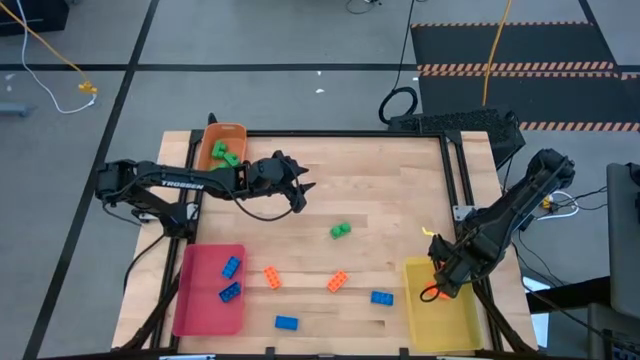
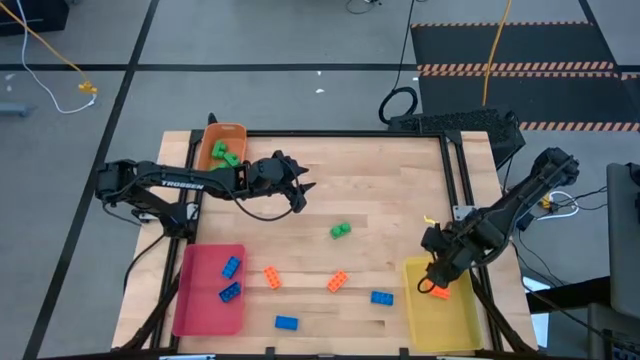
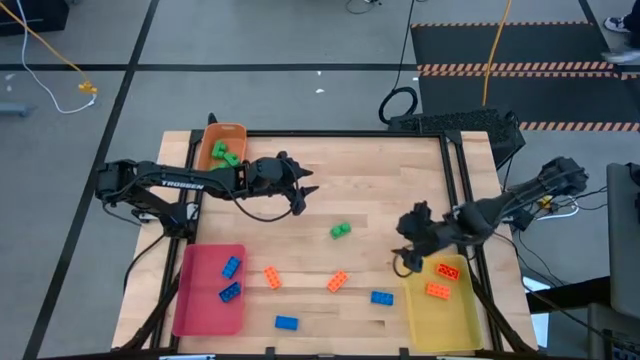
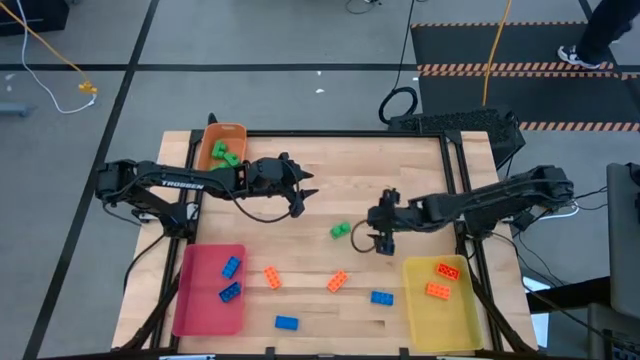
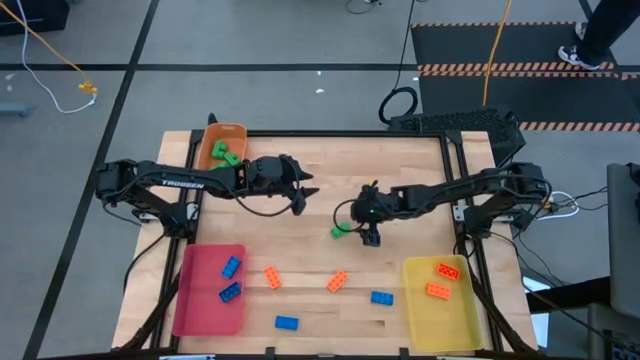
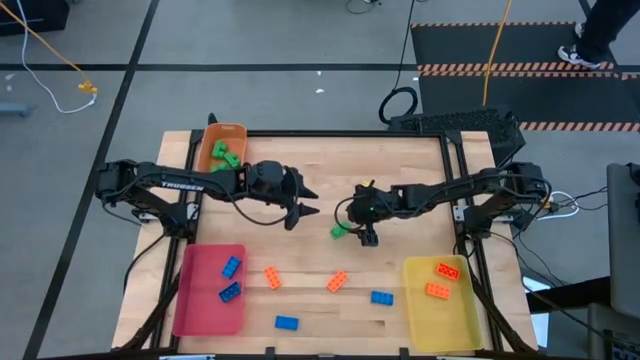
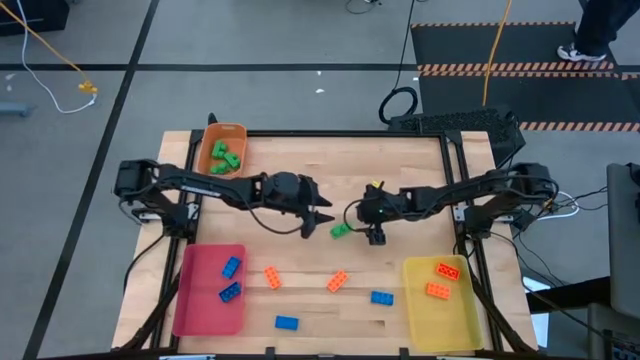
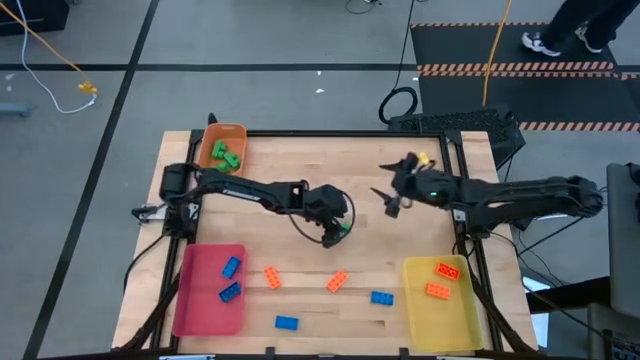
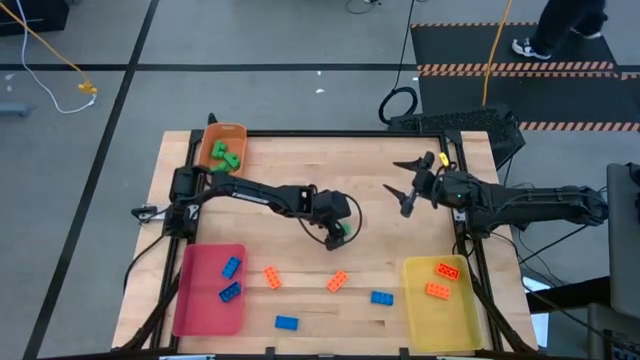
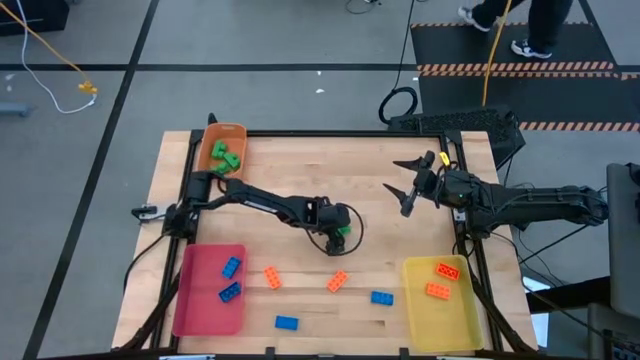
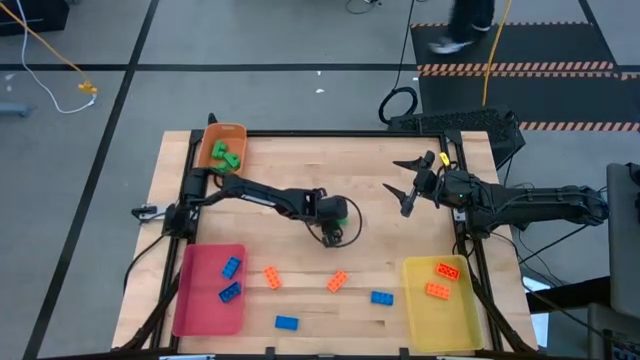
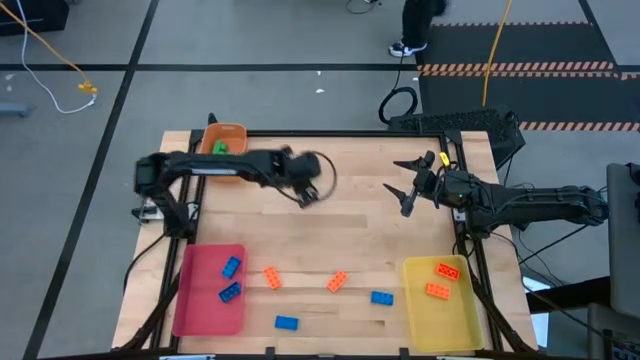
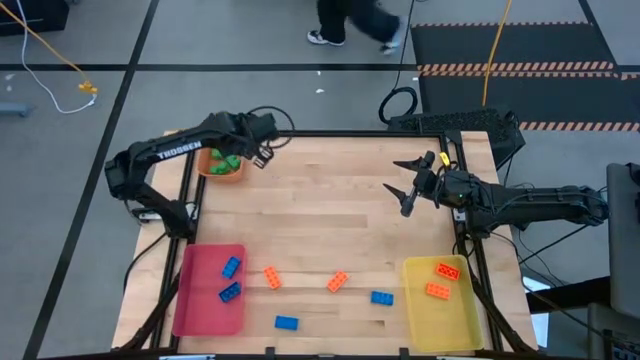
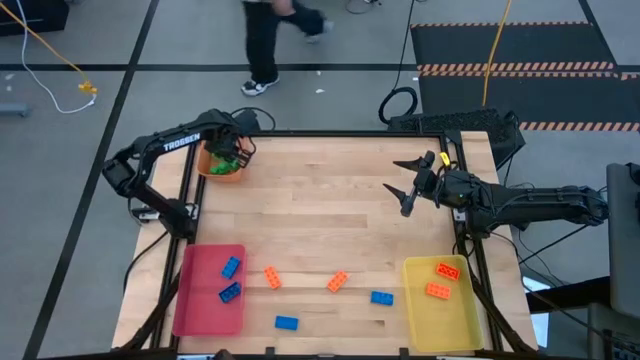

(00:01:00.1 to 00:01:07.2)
Task: Sort & place blocks by color
Put the green game piece into the orange bin

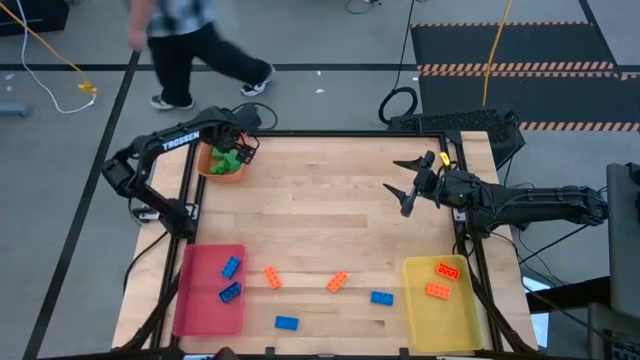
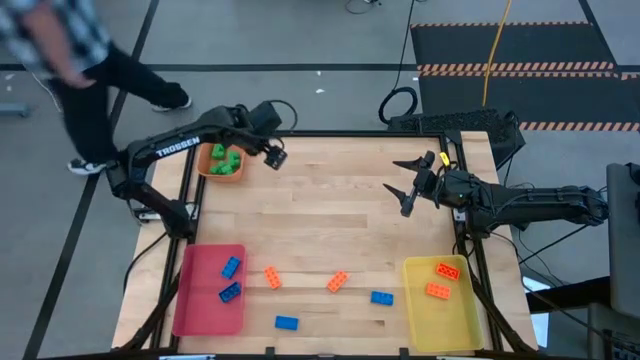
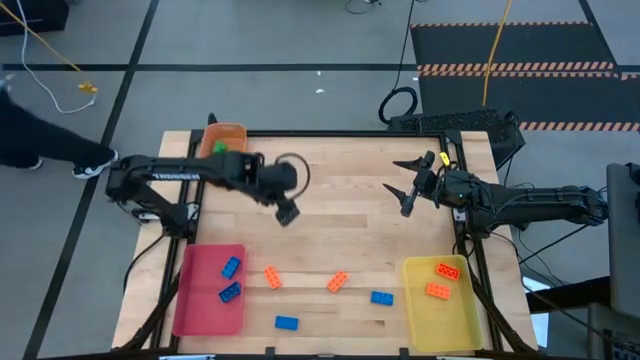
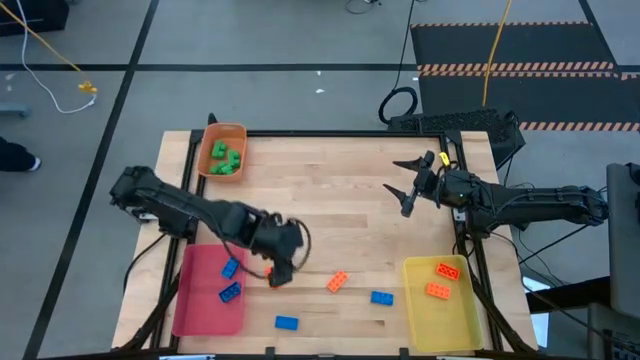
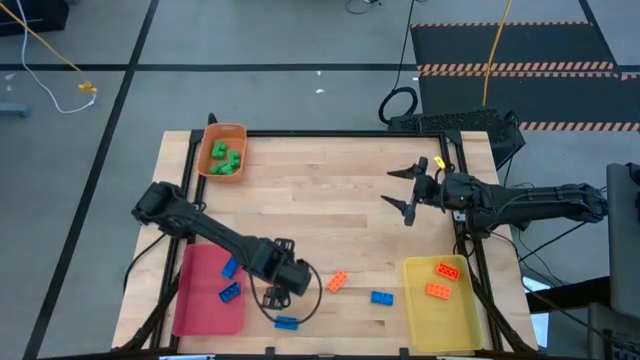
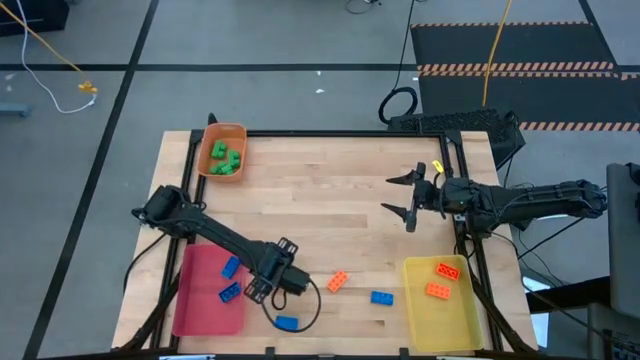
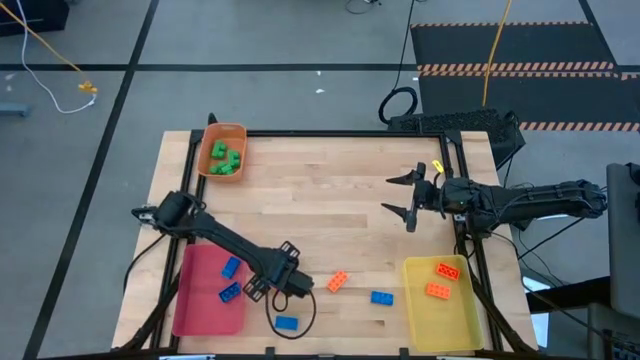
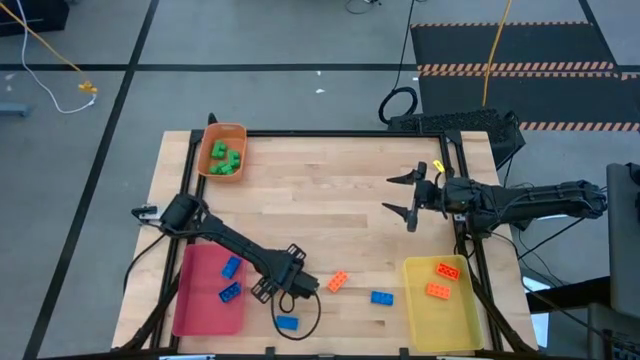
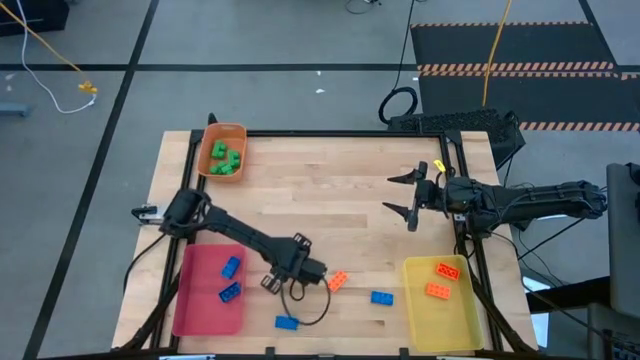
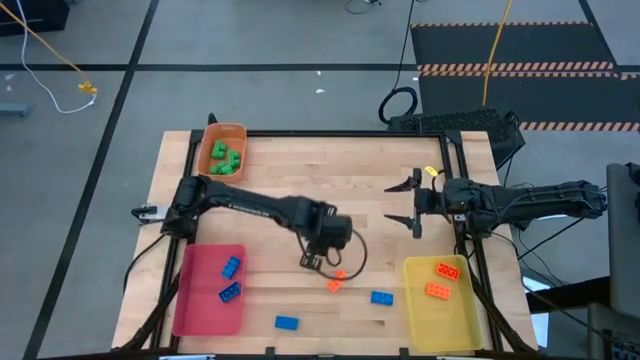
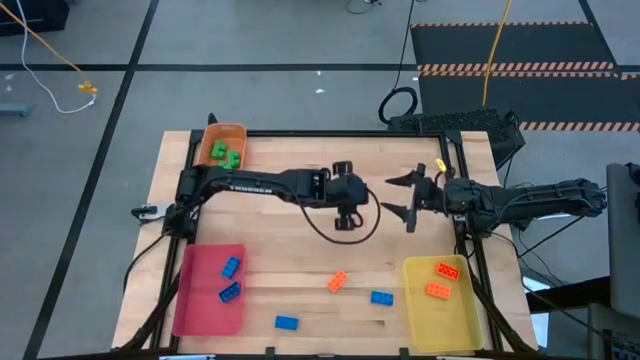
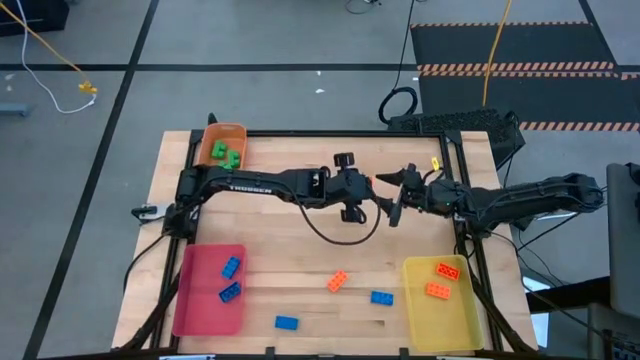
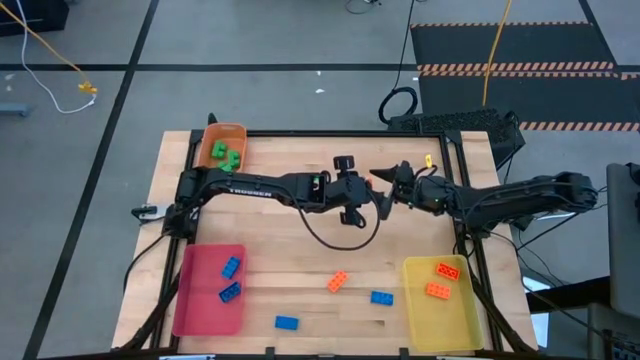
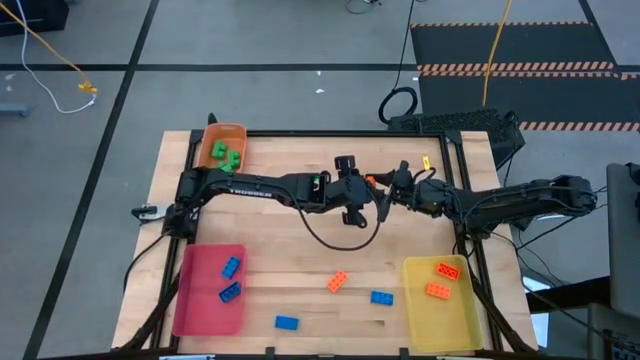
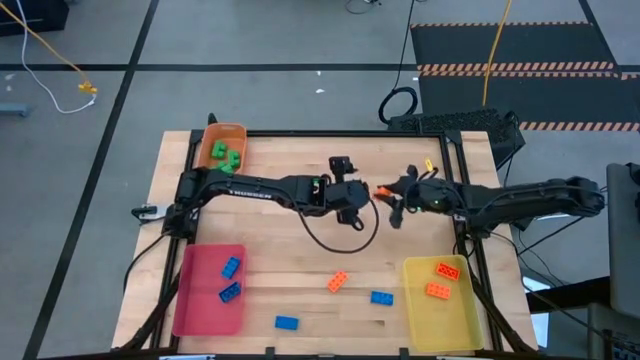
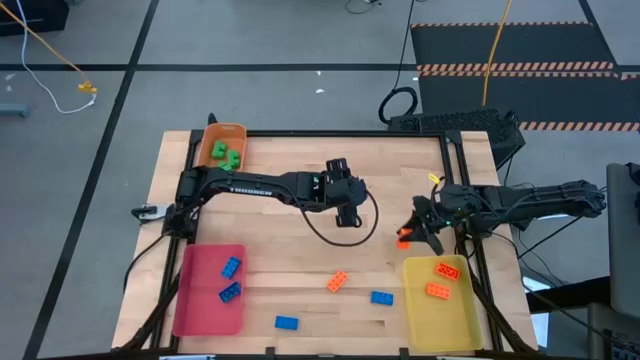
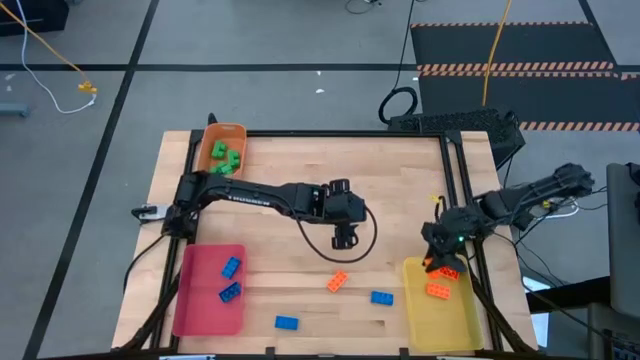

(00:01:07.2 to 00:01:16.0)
Put the orange game piece into the yellow bin

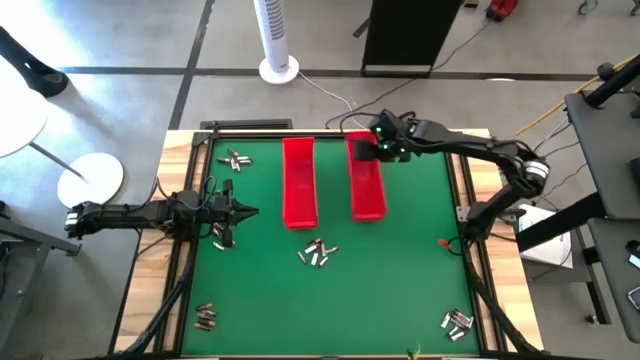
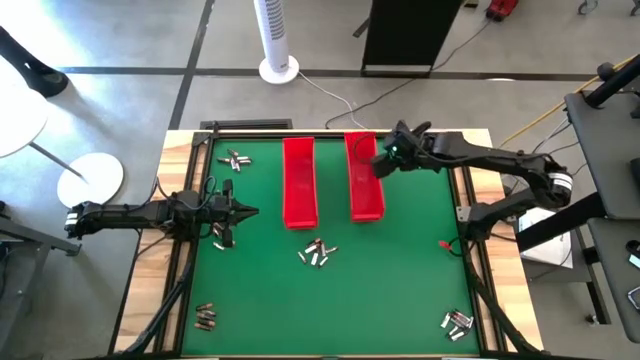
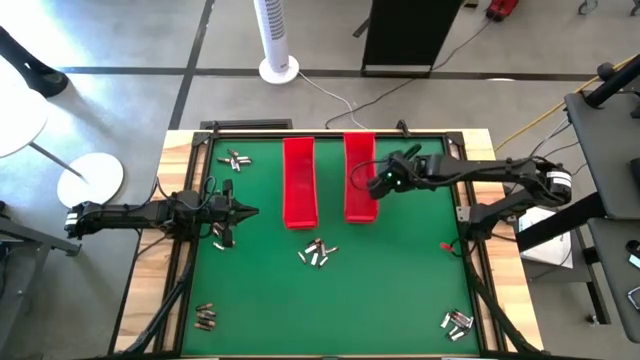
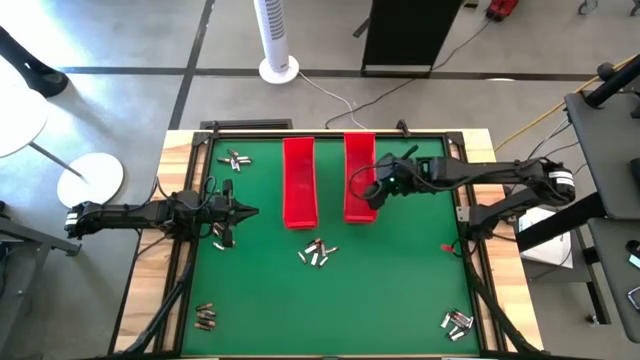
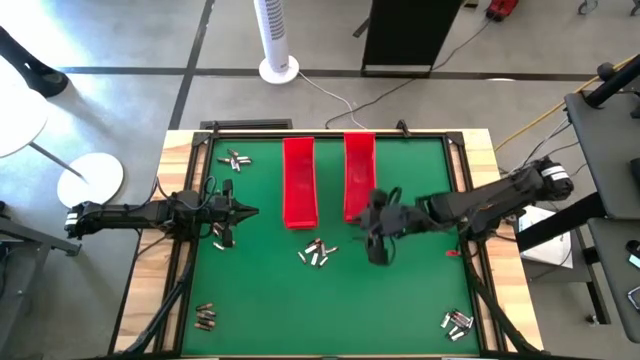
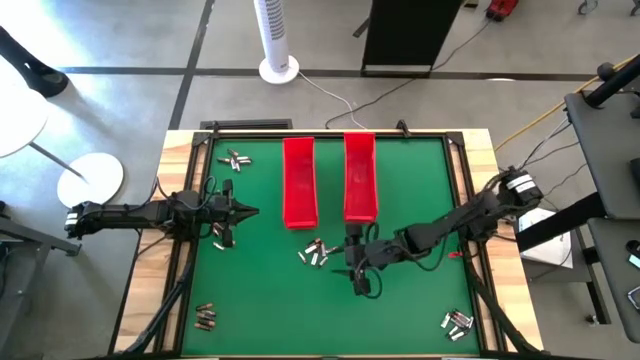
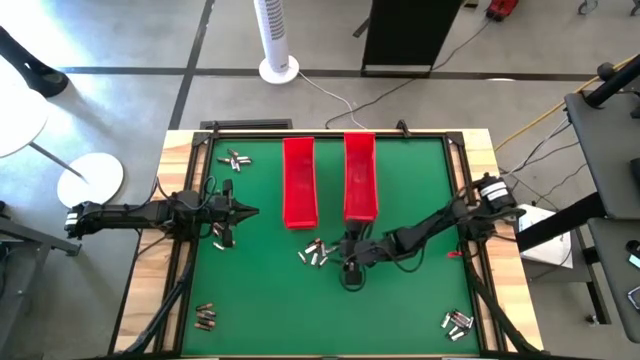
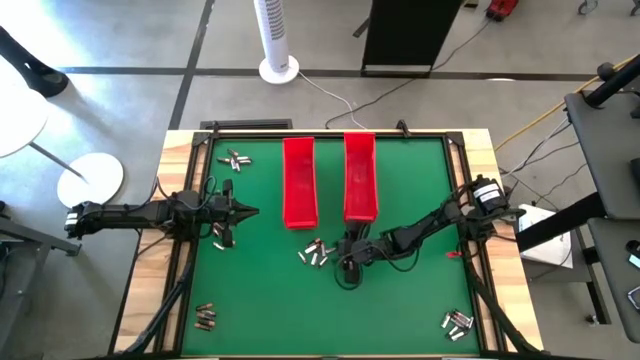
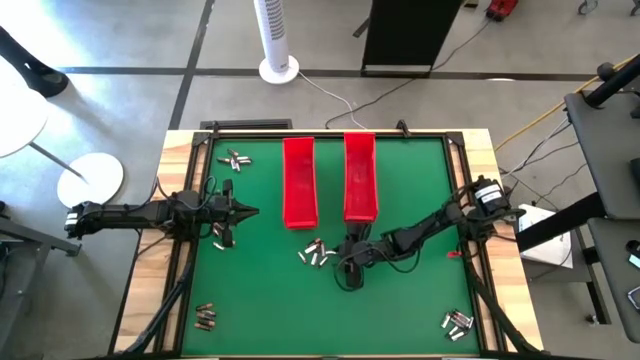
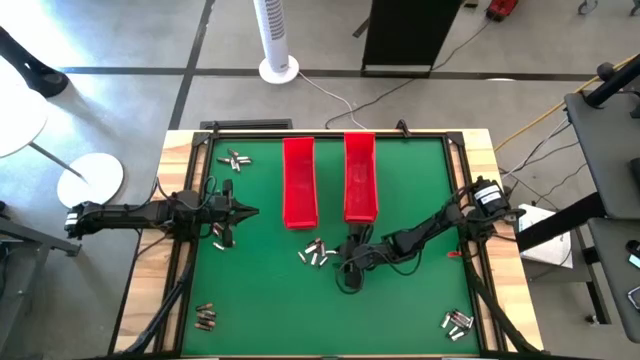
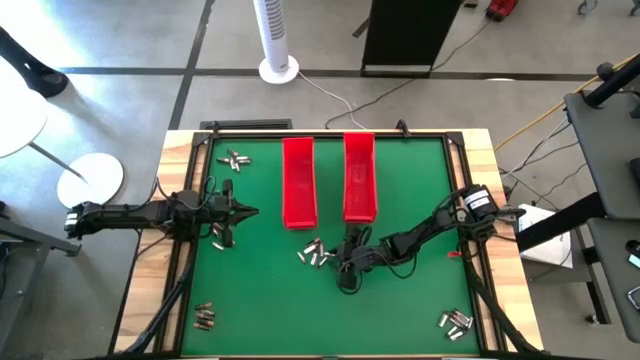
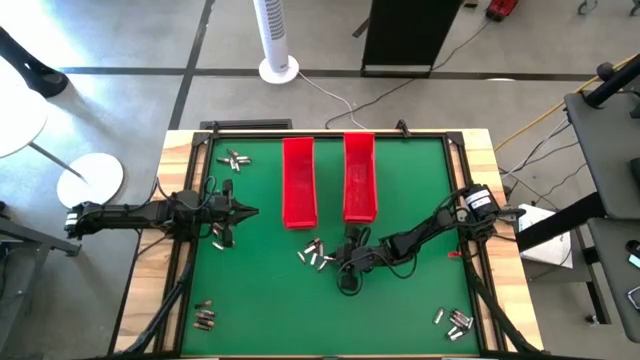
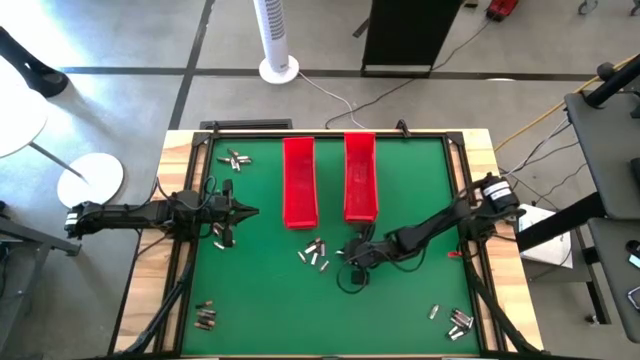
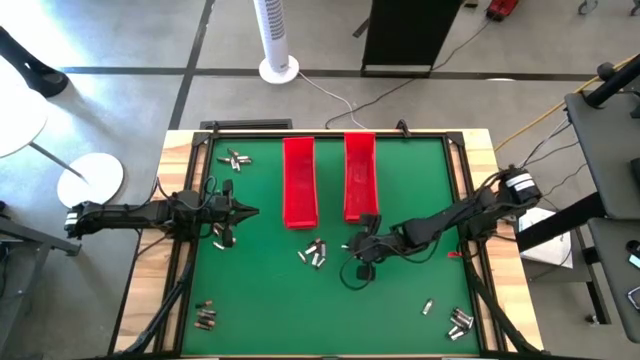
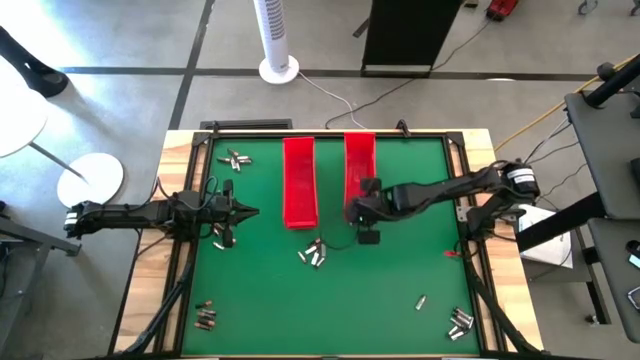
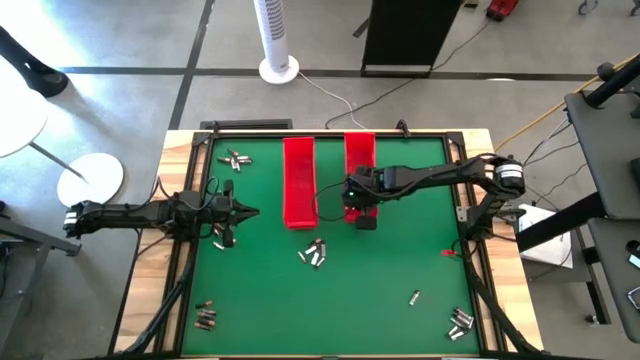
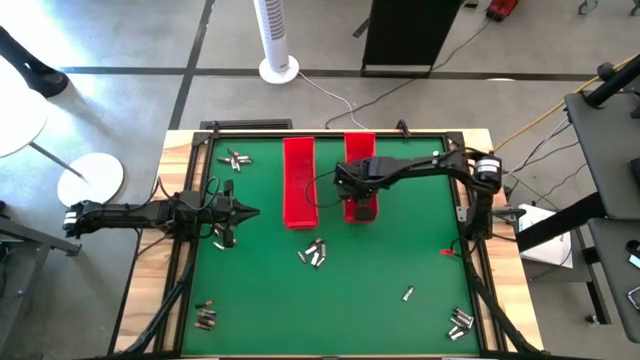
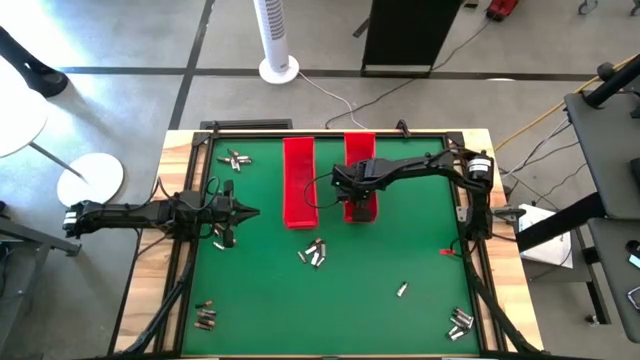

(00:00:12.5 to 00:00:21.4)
Task: Sort batteries
Put the silver battery into the right red bin
